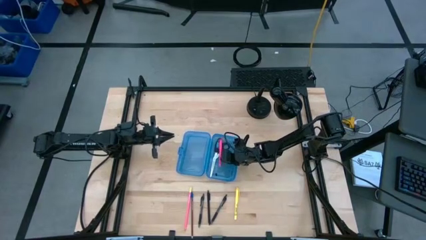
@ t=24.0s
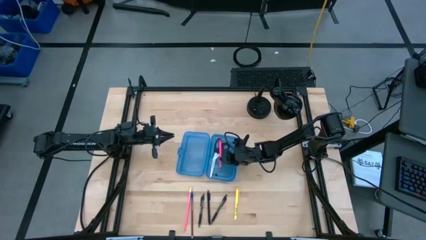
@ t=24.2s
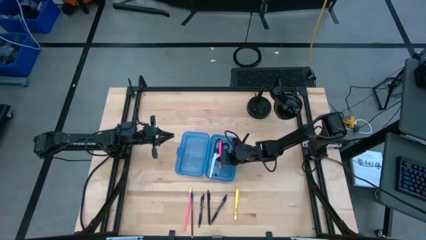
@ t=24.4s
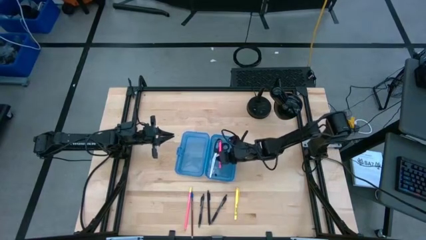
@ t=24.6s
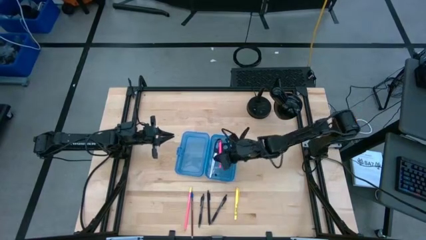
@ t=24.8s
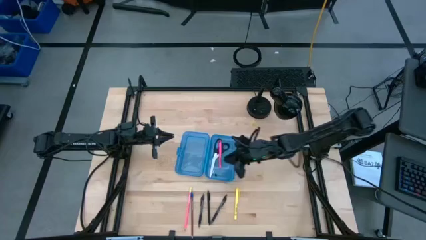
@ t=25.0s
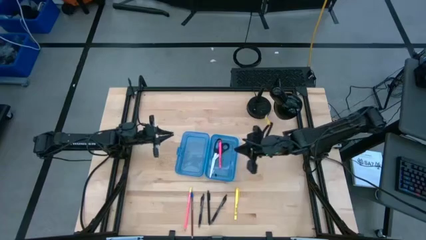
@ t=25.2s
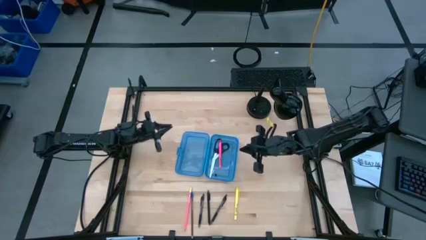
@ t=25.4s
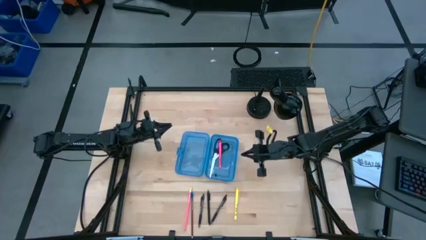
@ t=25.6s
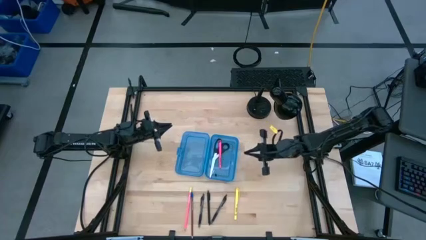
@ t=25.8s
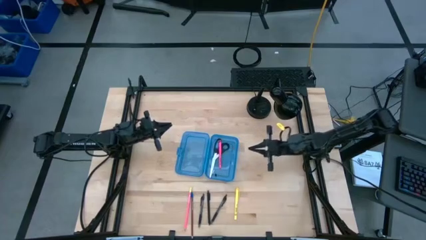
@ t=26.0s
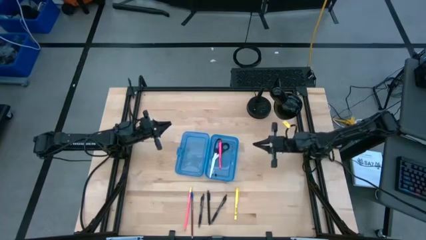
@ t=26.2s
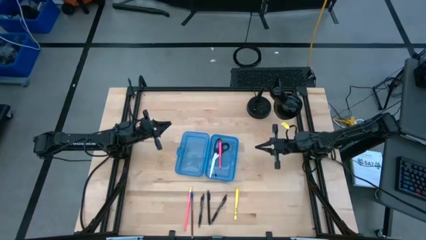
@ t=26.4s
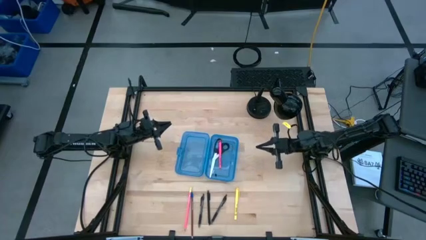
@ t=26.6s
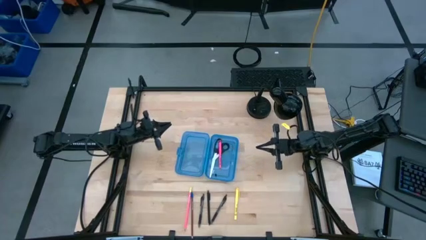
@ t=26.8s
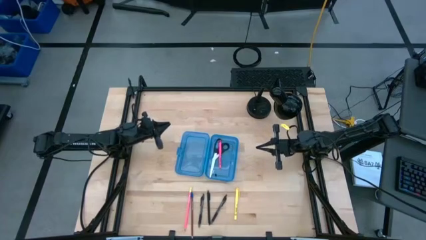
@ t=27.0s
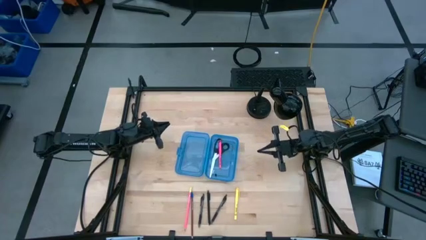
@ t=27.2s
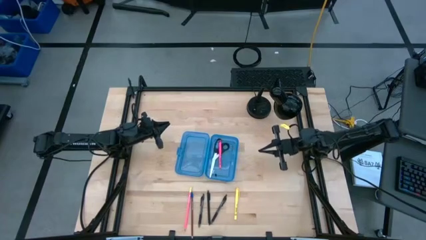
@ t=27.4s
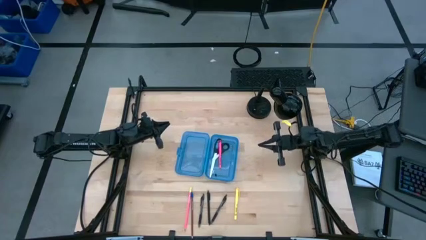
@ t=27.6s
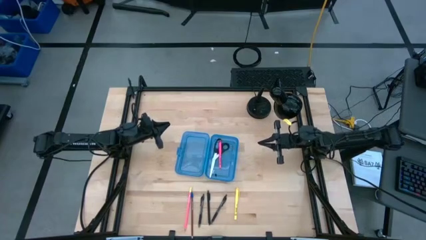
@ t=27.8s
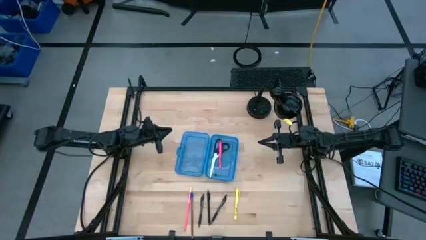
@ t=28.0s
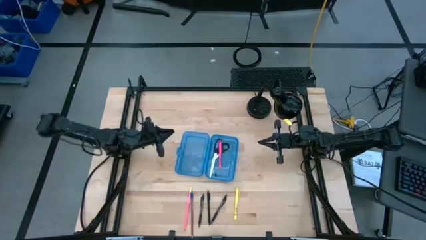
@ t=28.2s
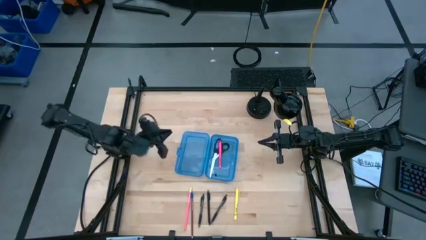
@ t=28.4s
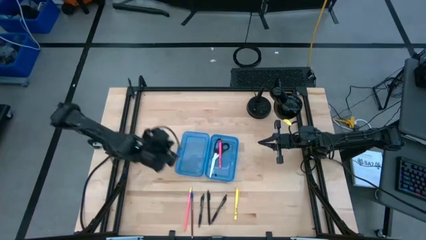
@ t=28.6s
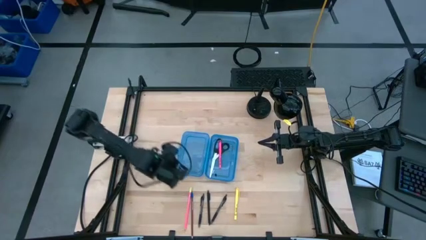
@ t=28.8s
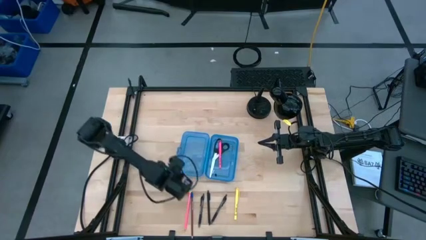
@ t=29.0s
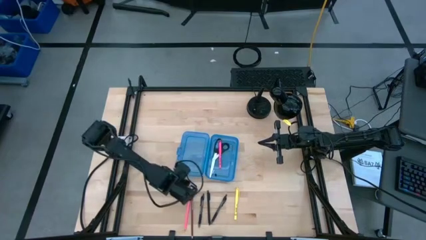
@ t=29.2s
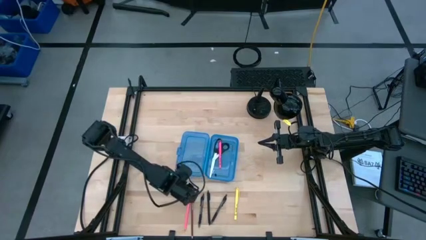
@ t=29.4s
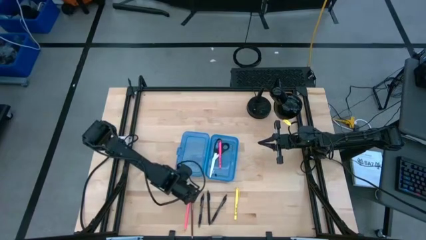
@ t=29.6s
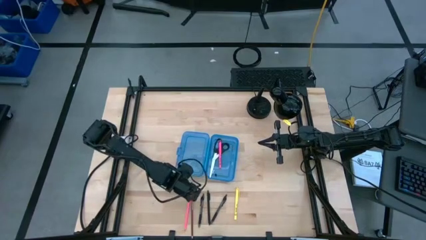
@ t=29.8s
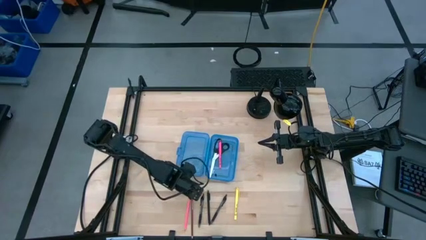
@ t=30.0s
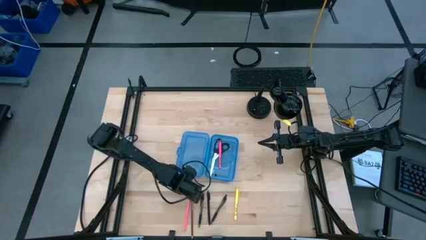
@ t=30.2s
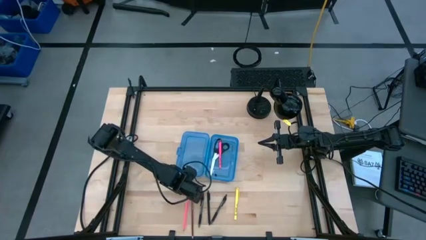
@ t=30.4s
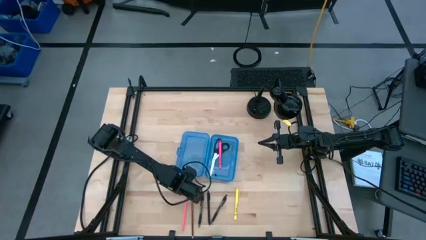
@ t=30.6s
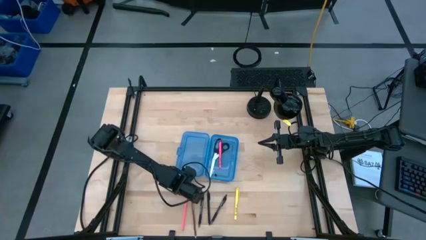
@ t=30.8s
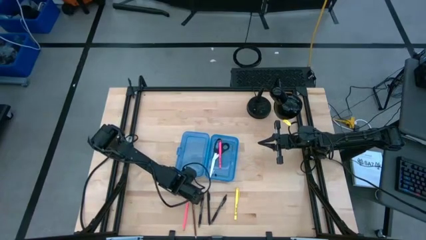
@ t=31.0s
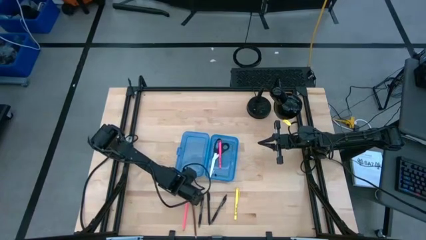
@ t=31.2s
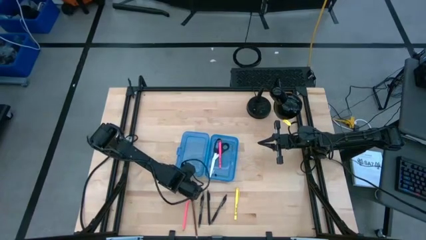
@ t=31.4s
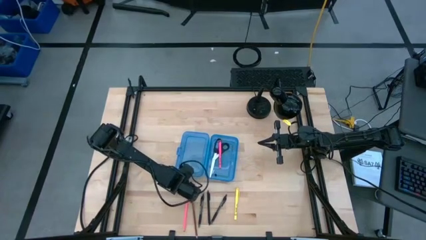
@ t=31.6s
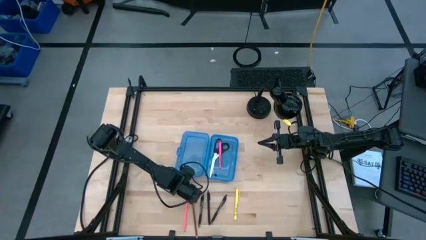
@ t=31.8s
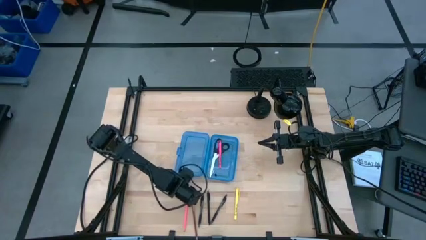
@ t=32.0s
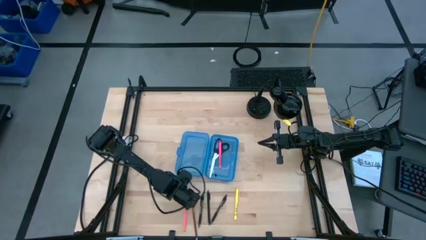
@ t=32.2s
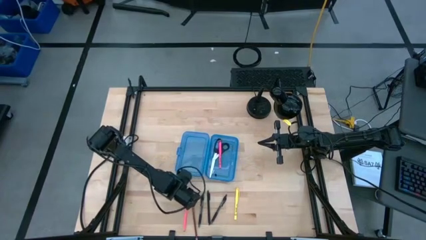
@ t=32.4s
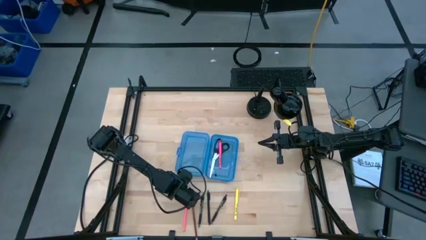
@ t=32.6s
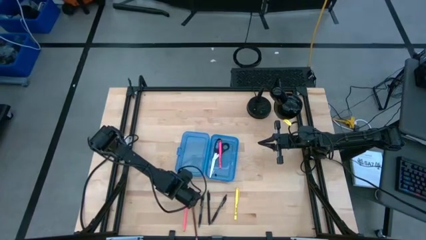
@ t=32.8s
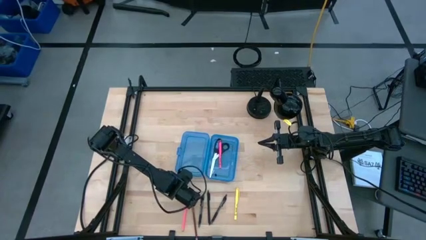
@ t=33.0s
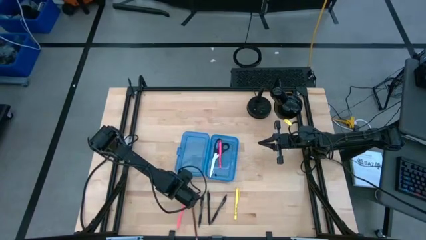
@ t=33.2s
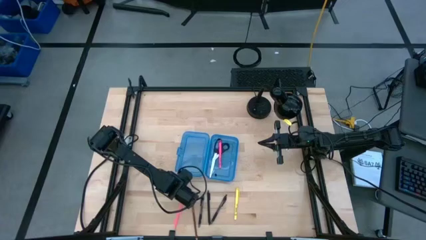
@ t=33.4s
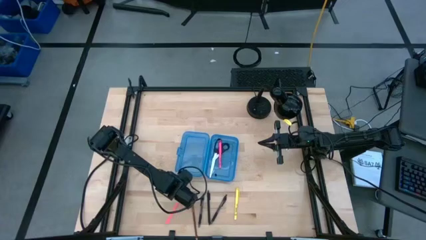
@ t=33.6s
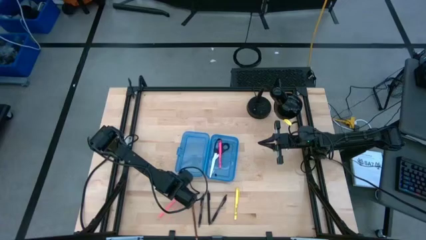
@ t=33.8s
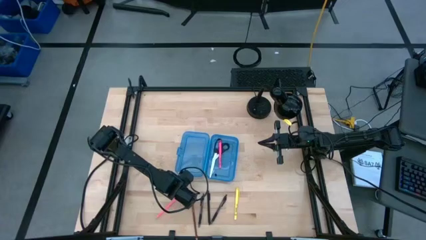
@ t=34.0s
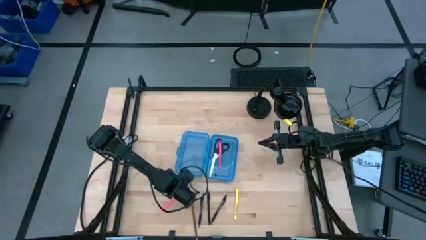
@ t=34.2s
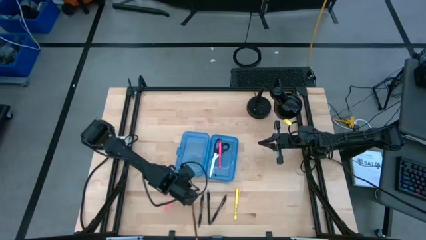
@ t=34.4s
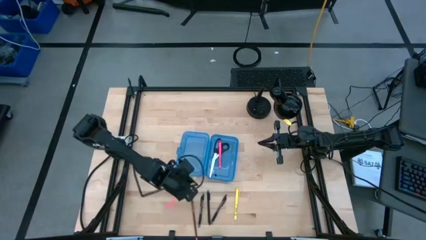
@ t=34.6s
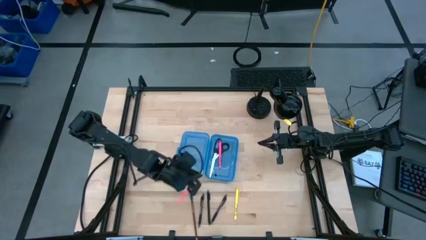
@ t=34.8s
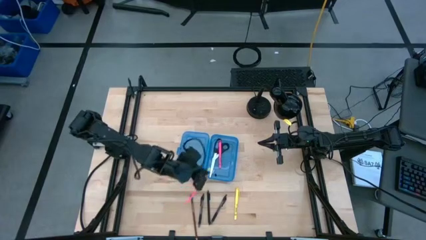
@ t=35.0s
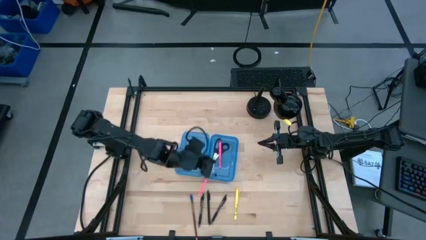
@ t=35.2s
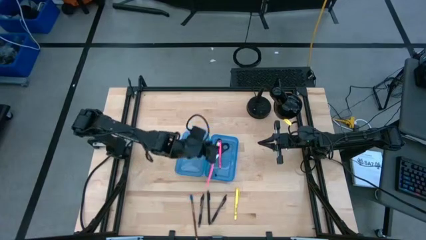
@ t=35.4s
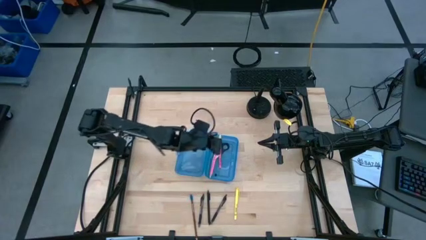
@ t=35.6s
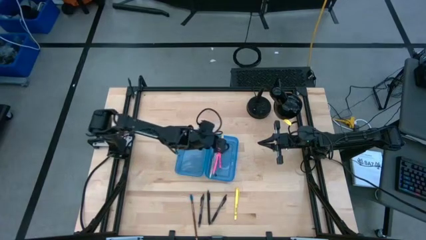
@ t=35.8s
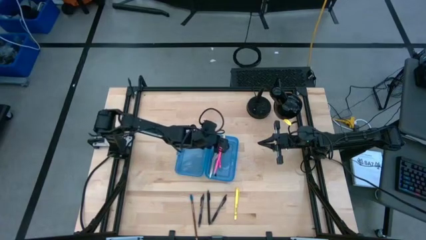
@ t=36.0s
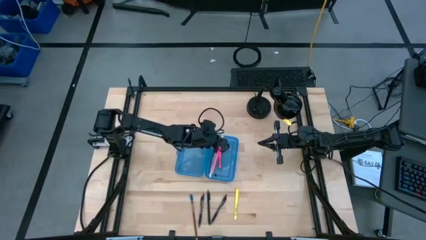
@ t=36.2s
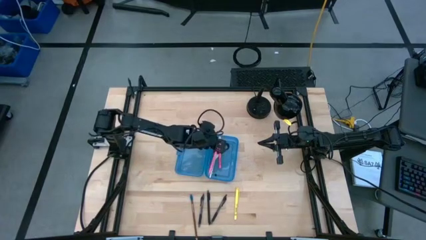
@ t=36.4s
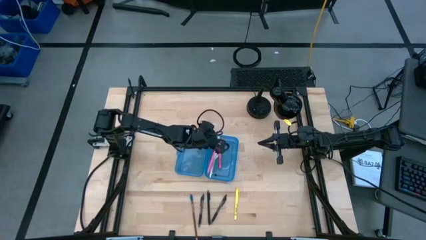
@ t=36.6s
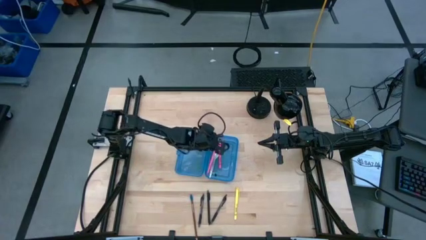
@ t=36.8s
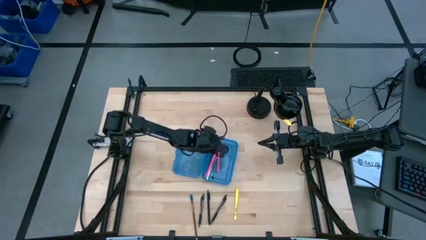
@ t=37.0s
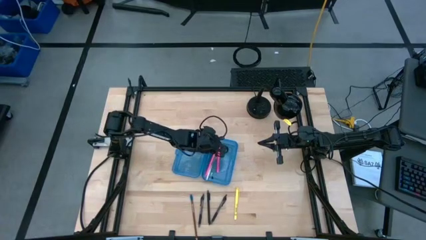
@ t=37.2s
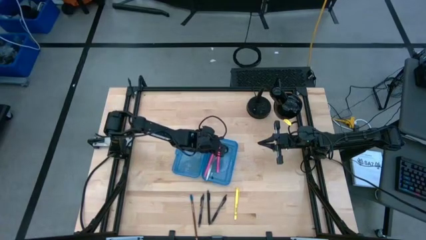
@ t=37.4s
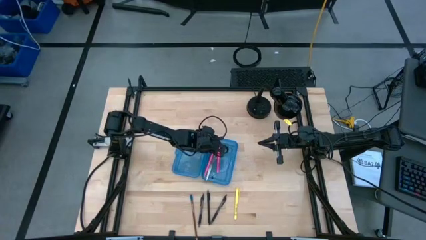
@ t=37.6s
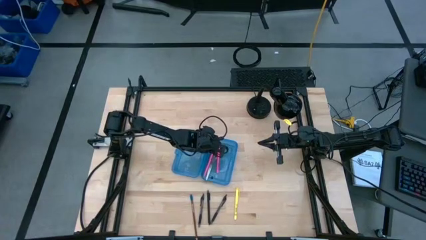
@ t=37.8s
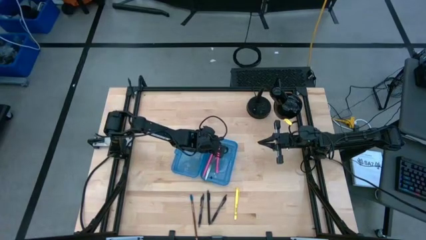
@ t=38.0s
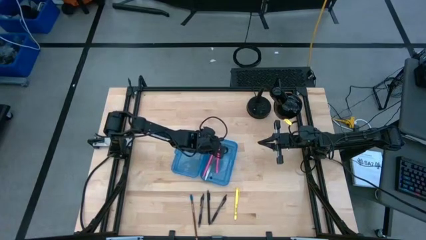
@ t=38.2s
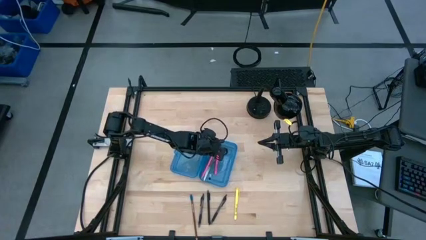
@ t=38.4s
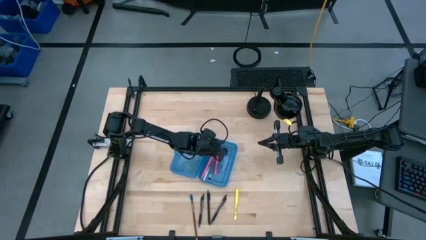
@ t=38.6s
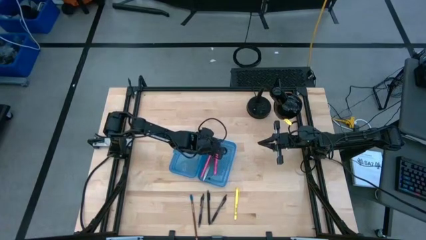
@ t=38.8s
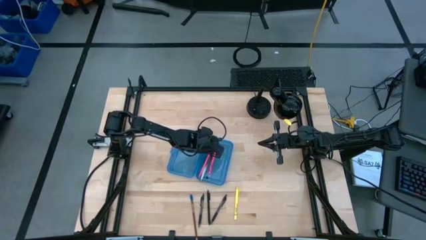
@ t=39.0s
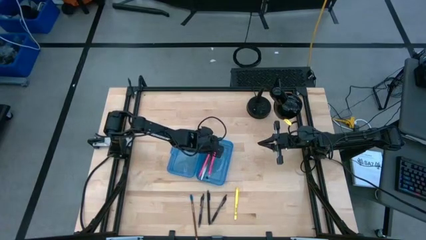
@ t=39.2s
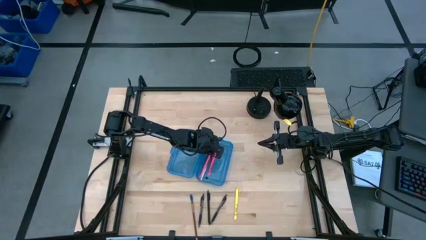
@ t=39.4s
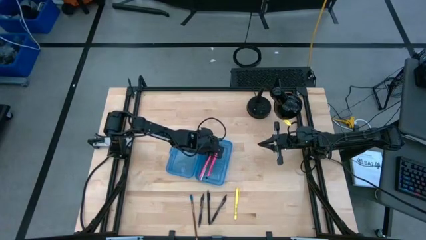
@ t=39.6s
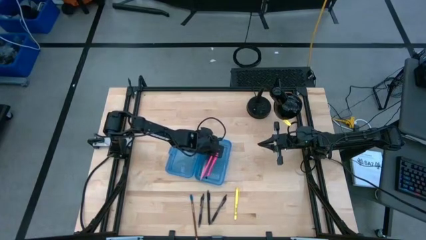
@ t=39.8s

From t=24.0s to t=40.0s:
Task: Pick & place school supplies into a supply box
Put the pink pencil into the blue supply box

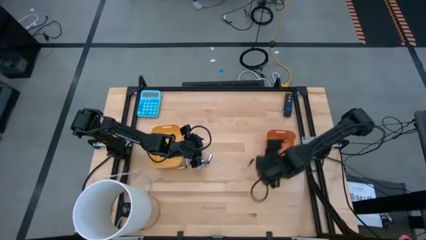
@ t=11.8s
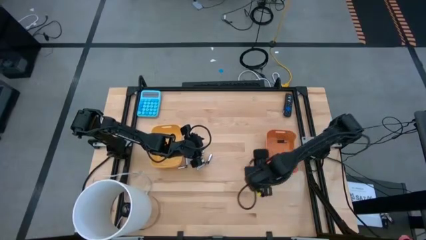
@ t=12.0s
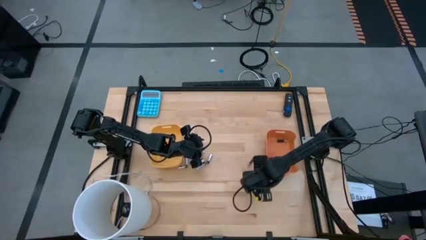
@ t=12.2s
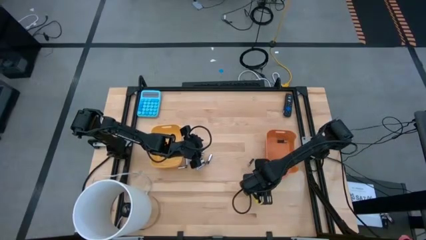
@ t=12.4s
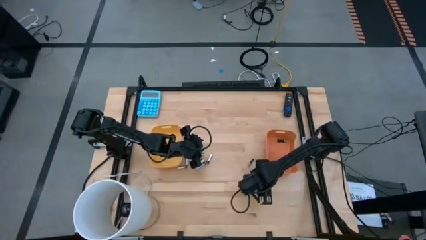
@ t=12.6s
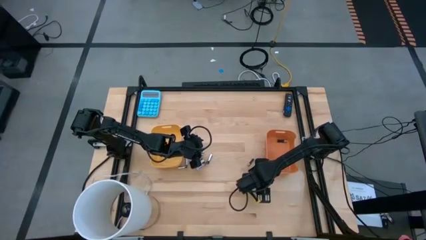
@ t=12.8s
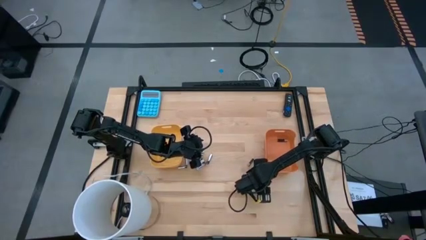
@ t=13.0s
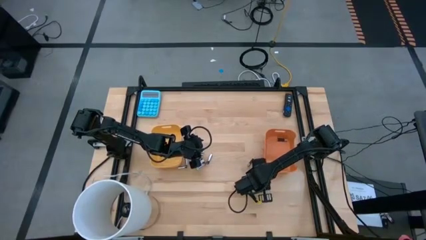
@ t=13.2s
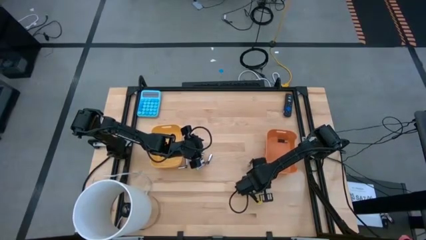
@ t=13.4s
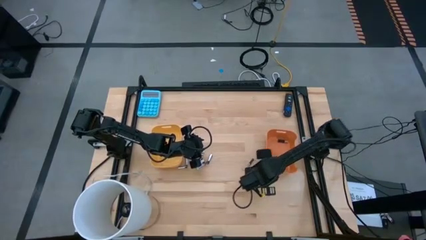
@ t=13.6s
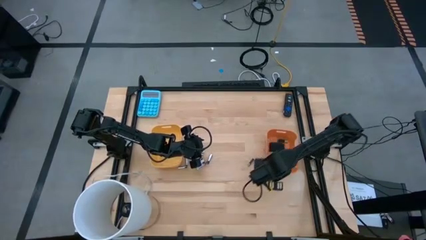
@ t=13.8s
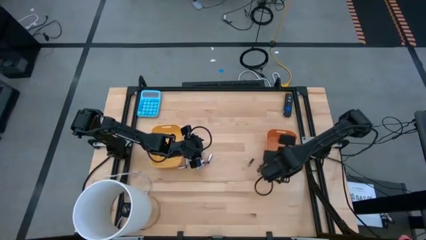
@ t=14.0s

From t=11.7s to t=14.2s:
Task: Sort batteries
Put the black battery into the orange bin
